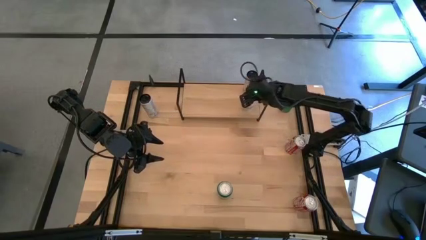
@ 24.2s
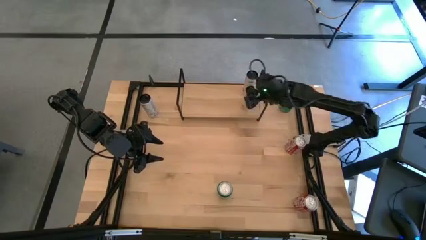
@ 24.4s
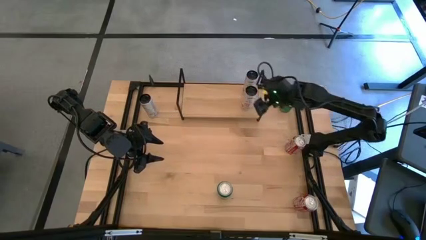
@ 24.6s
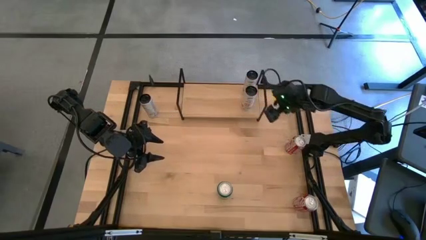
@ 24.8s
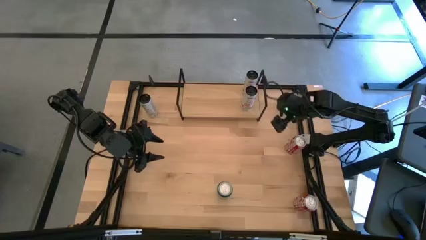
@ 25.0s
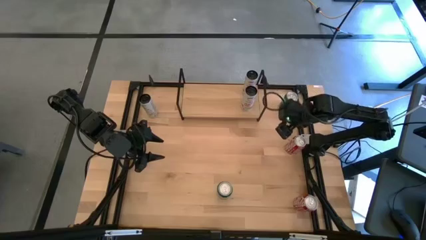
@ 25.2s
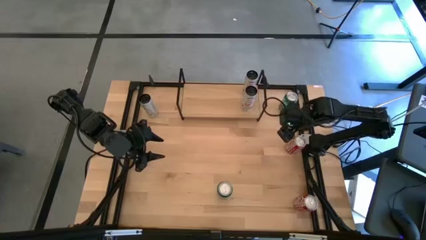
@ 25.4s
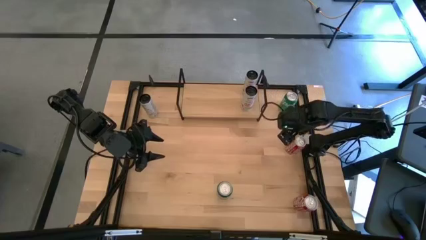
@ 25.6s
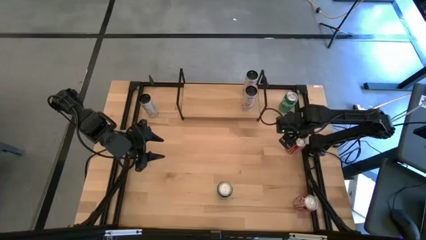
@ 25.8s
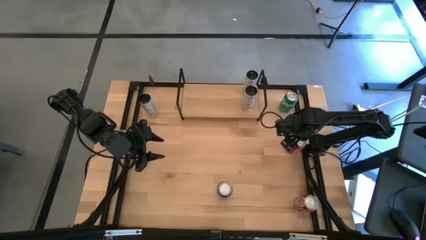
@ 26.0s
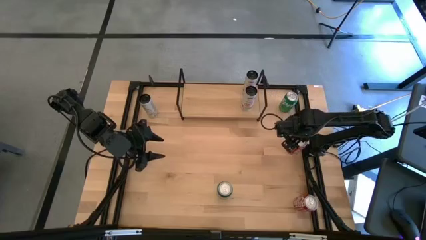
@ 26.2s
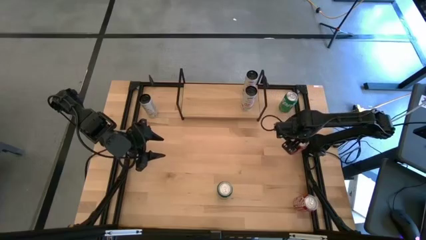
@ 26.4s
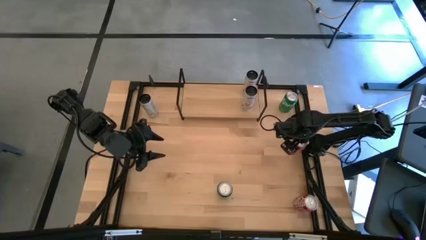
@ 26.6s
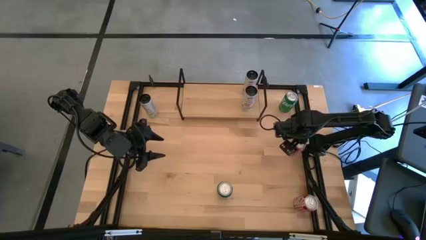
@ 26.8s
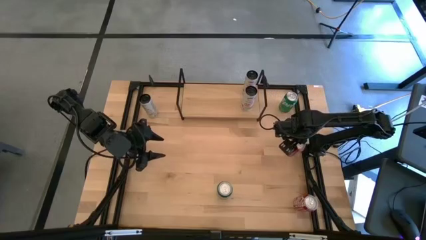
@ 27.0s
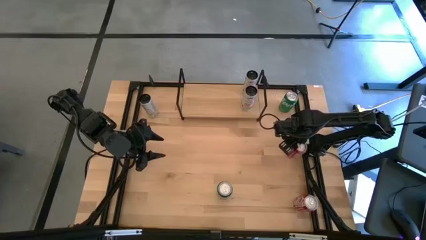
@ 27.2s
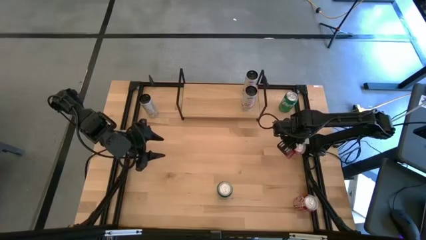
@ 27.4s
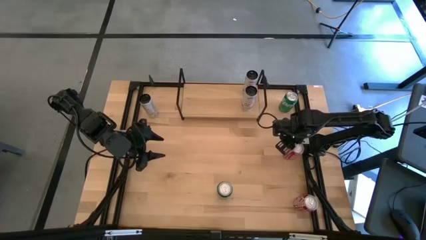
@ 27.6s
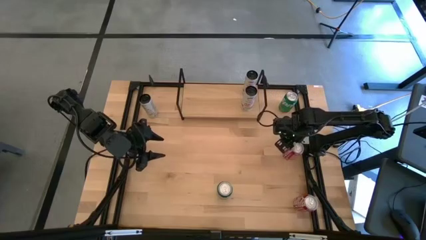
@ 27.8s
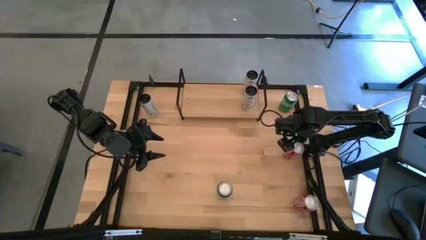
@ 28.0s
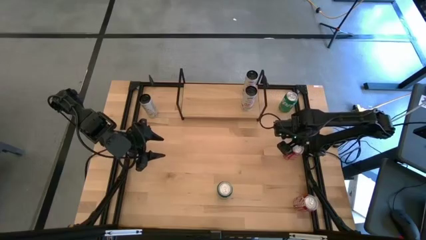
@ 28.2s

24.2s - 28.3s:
Task: Place canned beverage on shelf
Put the red soda can on the shelf

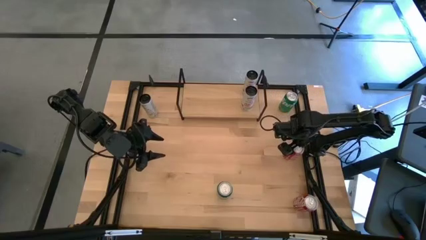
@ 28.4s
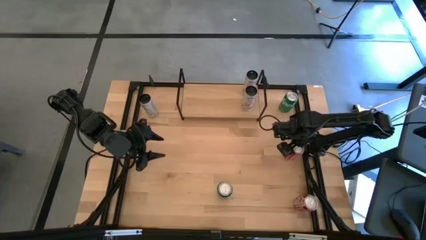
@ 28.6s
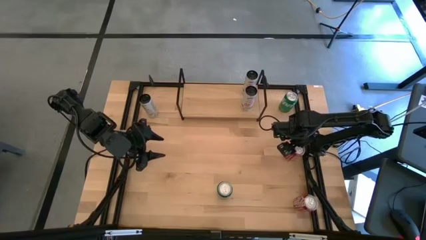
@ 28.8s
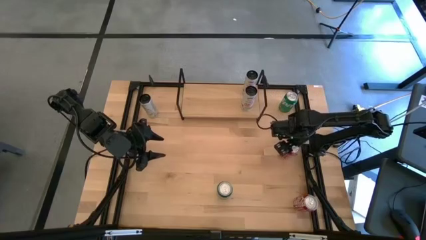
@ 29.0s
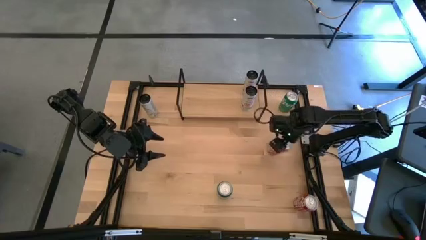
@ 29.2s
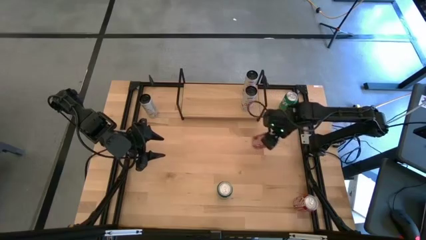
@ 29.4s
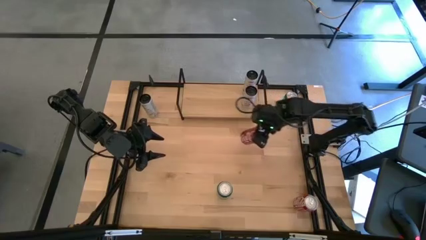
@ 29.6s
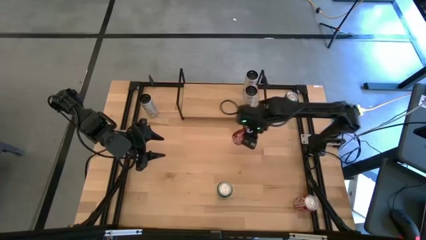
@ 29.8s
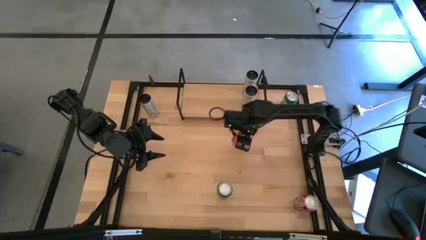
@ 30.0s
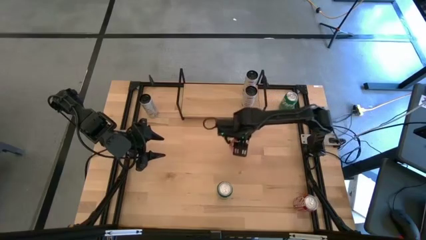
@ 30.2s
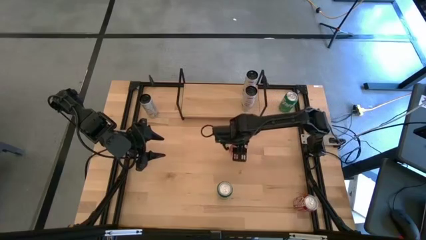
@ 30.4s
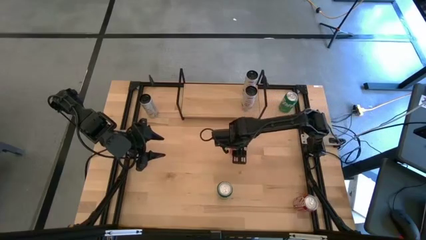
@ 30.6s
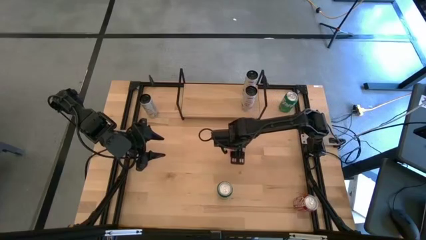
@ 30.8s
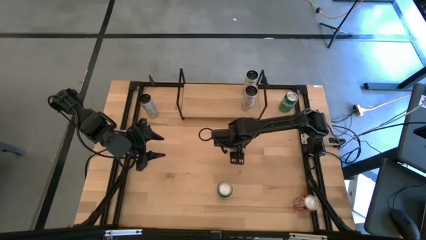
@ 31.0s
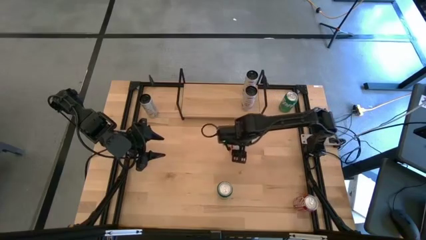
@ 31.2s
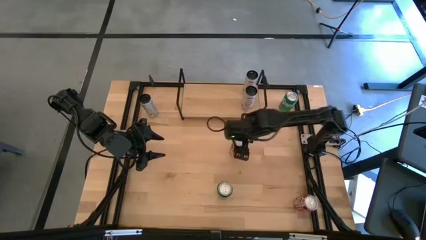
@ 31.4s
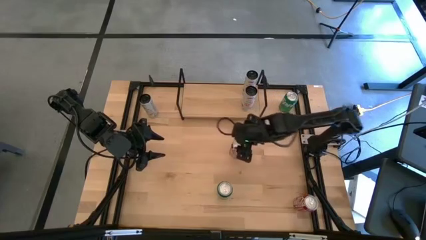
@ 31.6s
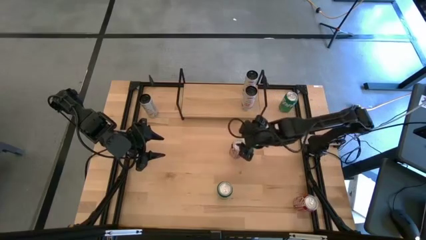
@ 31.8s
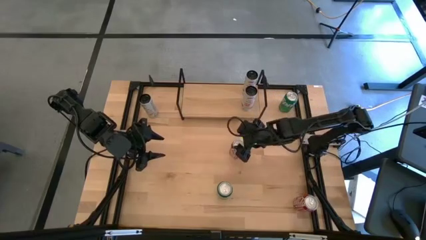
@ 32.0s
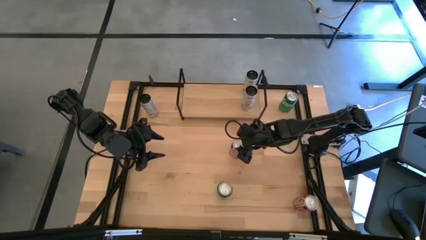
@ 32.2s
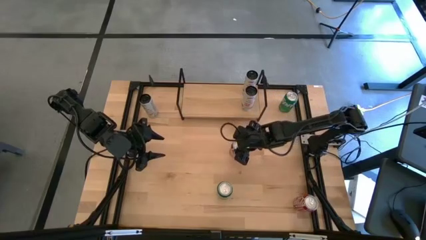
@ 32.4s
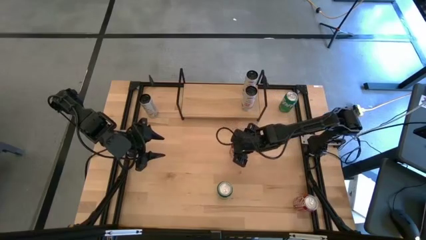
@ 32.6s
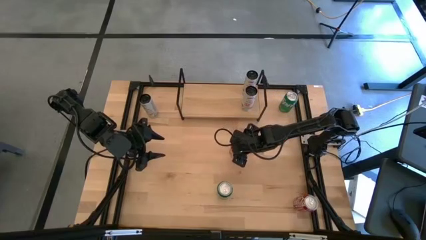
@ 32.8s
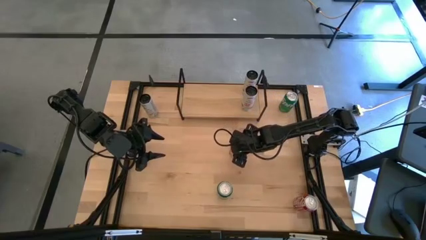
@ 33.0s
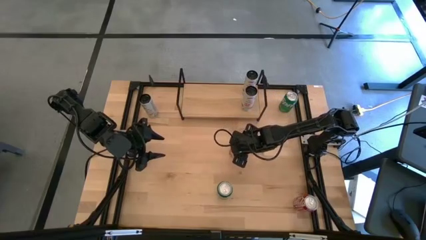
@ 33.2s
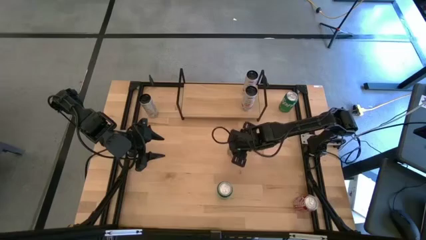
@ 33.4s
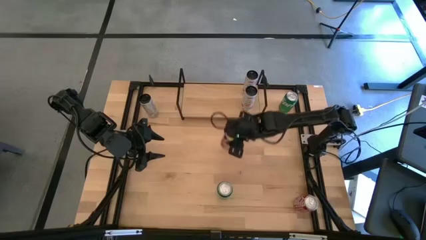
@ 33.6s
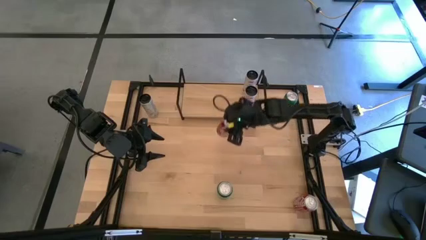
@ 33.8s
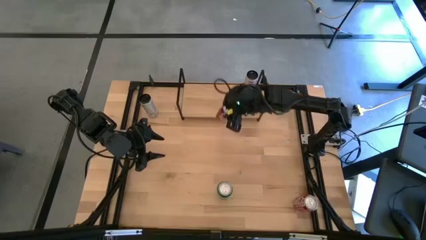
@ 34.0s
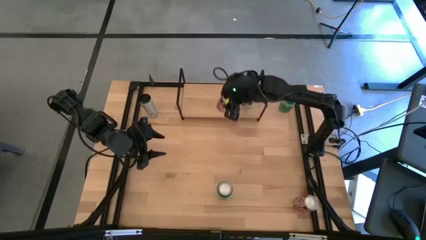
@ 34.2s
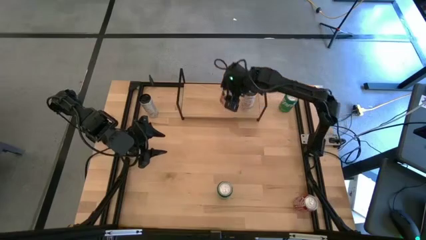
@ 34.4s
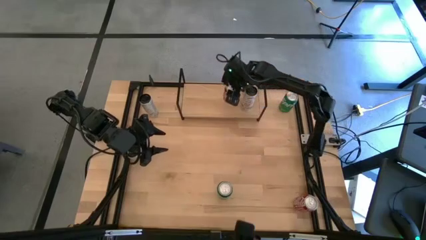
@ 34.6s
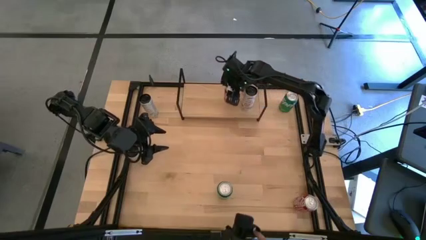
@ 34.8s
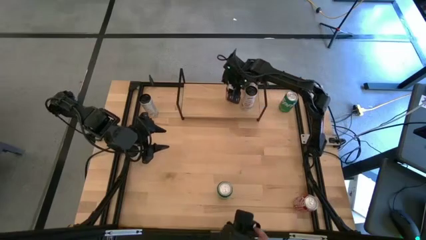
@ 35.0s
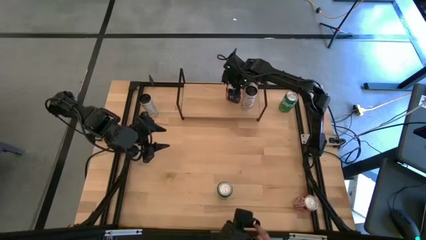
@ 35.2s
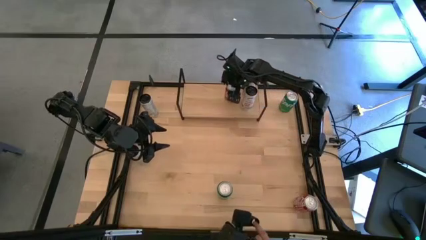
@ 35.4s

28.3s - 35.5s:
Put the red soda can on the shelf

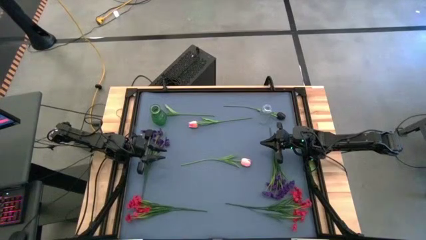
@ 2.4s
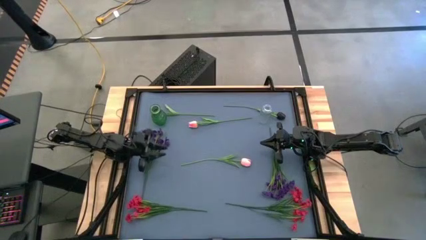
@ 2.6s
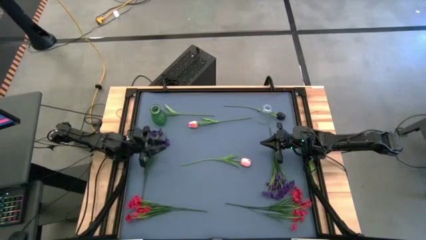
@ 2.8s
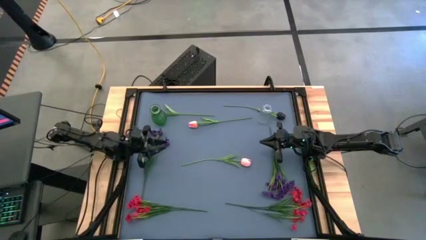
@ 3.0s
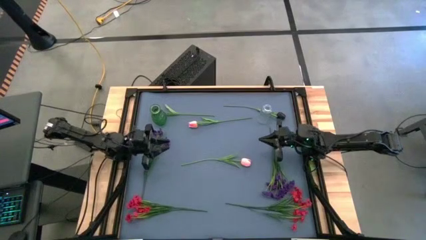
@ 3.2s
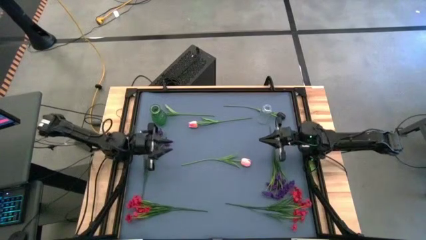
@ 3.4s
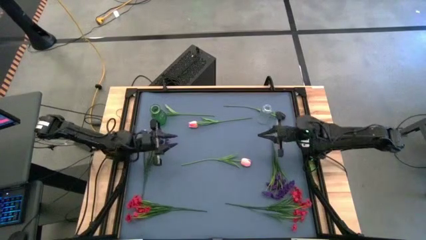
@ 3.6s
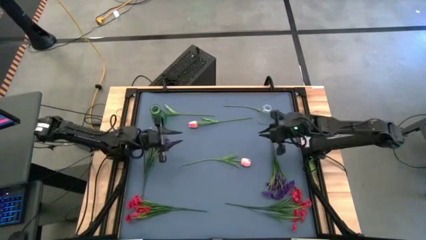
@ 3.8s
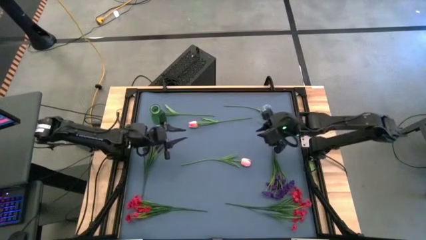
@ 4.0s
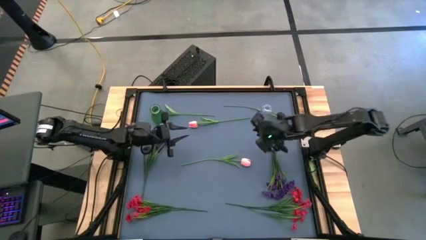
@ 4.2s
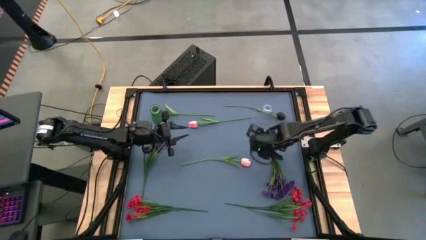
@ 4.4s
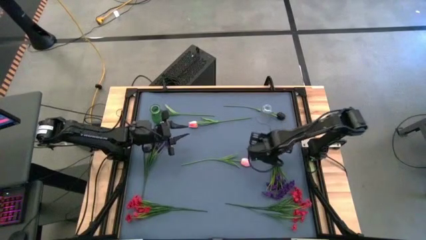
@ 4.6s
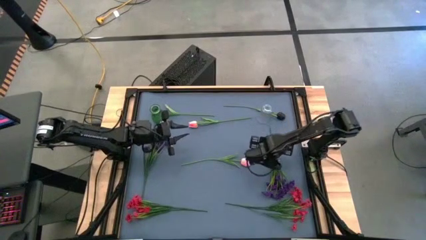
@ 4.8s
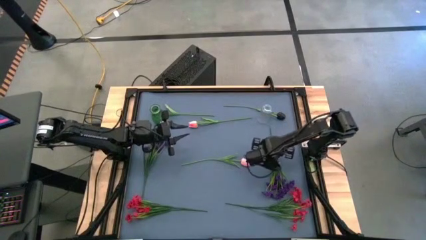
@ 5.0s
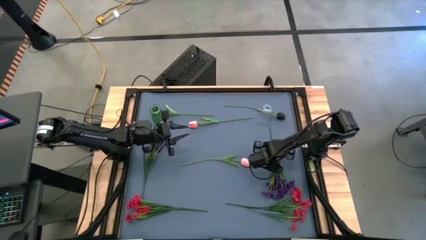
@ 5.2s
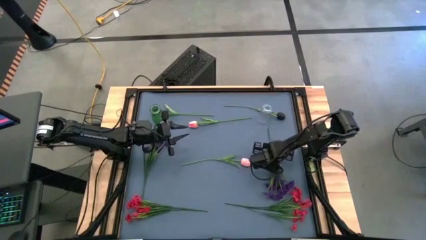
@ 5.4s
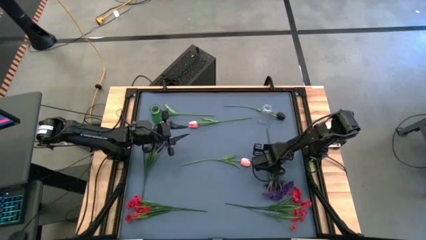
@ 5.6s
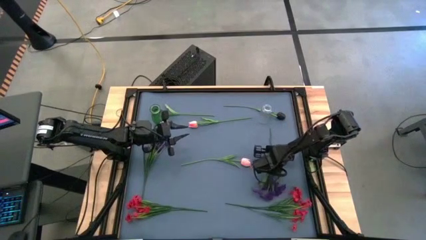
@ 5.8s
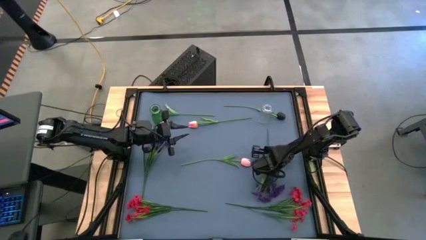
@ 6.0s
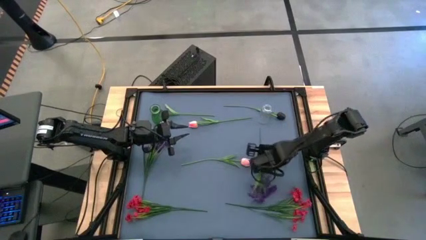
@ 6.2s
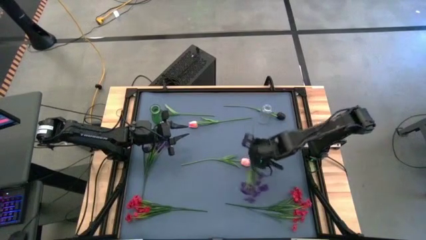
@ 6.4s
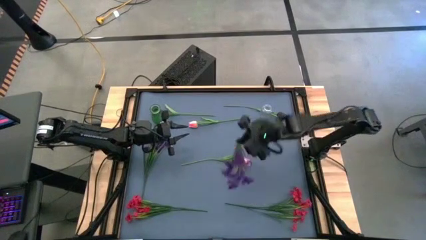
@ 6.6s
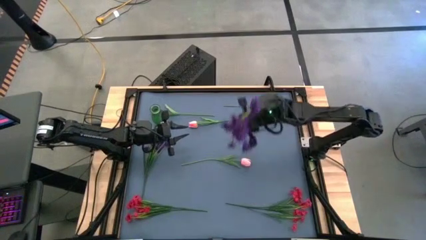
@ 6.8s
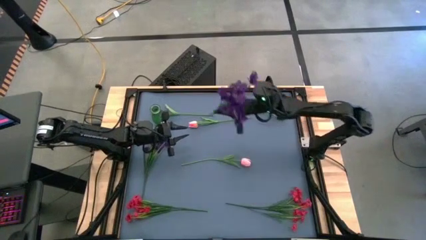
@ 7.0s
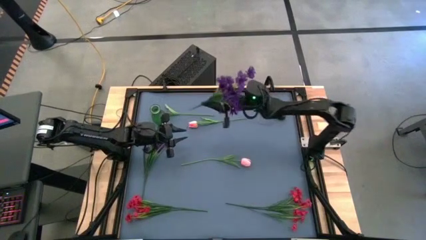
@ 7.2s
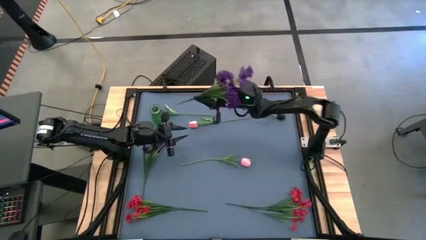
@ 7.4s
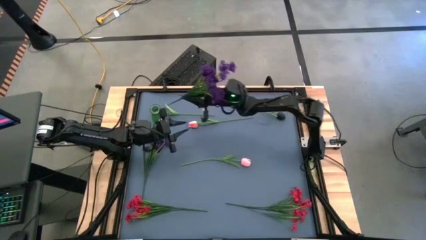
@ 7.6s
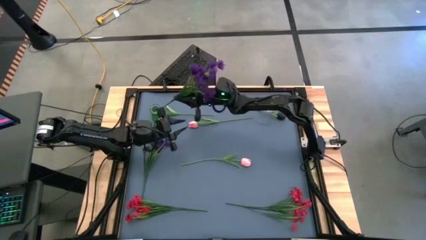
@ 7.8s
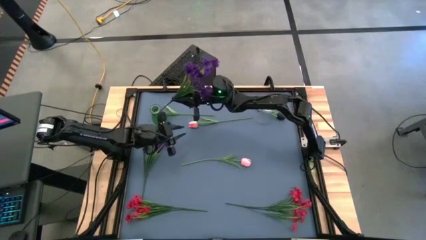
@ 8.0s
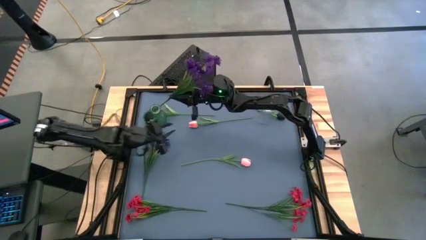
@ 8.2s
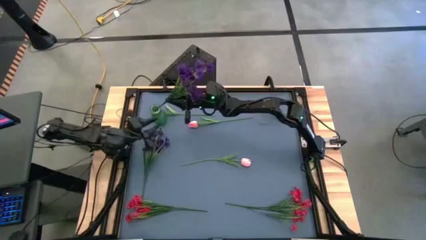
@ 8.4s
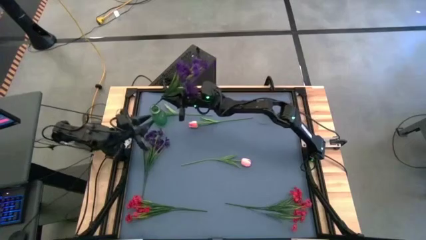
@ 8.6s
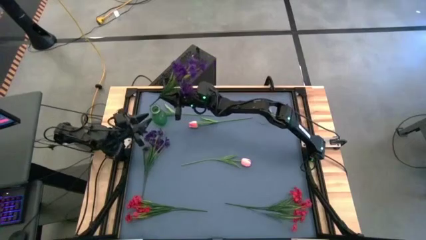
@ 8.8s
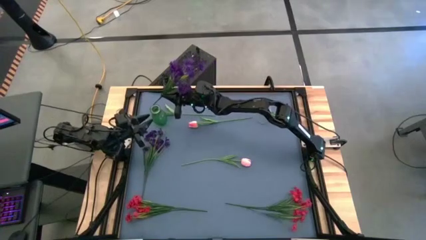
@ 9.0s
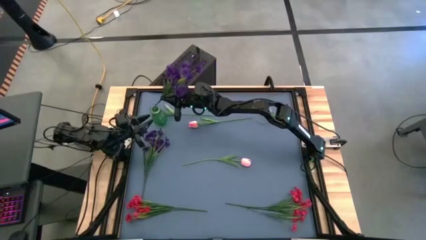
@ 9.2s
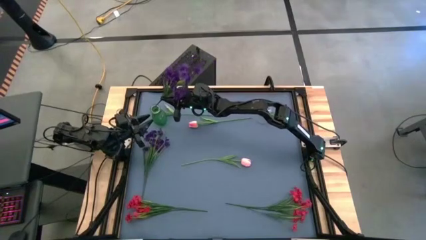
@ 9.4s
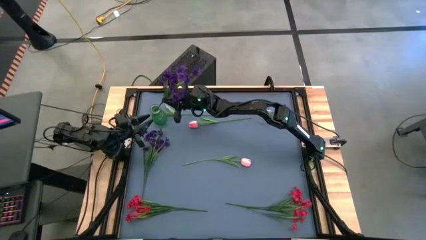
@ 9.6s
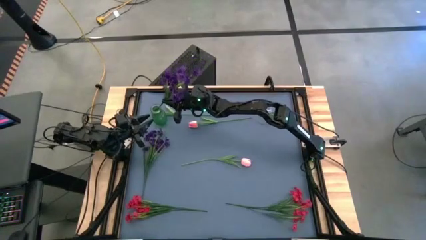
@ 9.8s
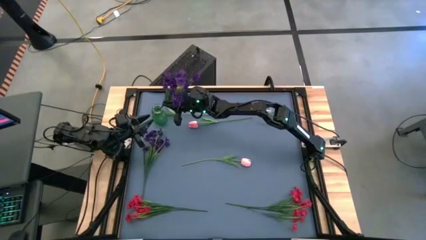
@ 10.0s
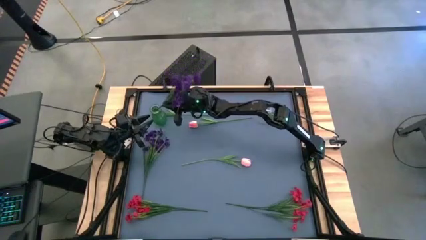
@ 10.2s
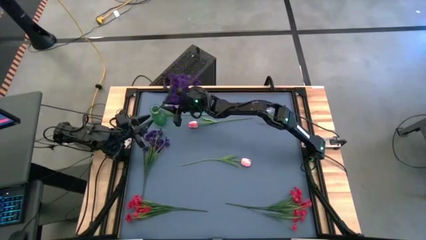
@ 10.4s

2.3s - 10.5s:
Task: Sort flowers into vase by color
Put the right purple flowers into the green vase
